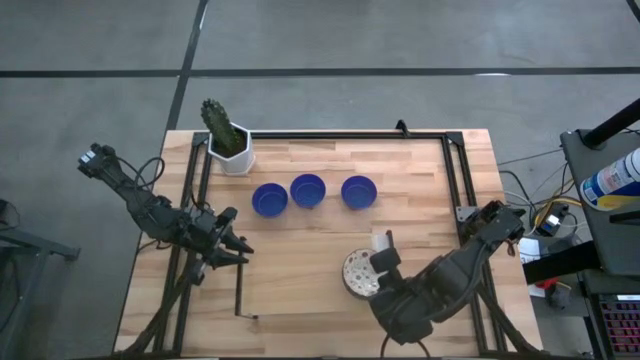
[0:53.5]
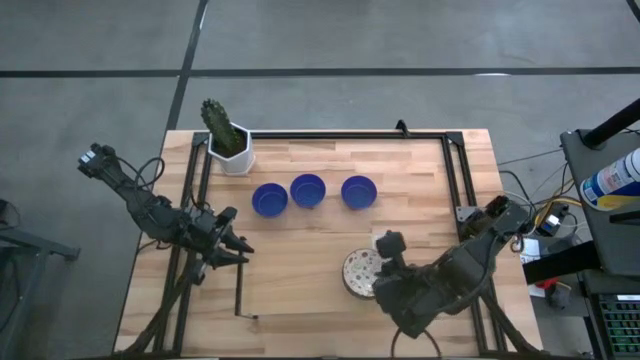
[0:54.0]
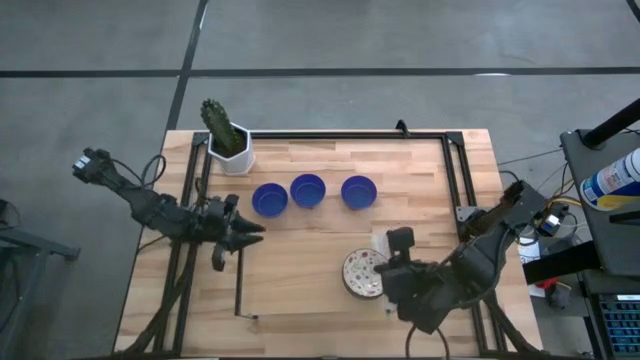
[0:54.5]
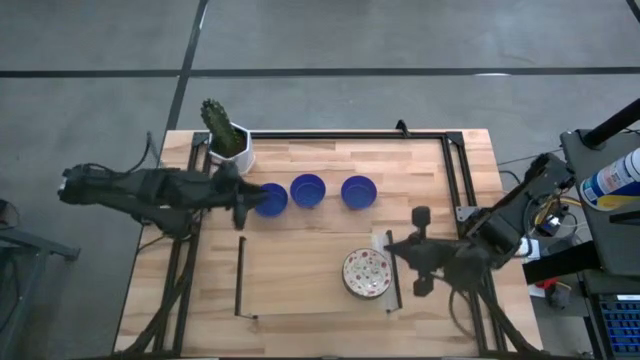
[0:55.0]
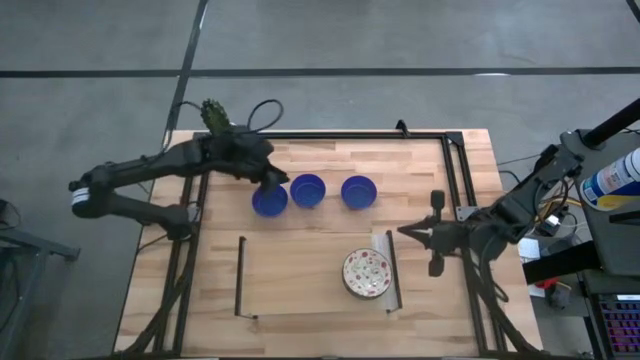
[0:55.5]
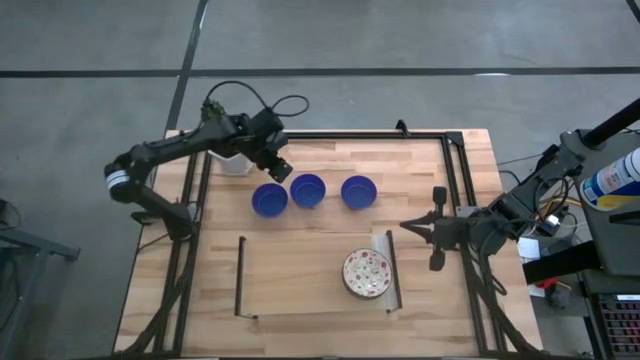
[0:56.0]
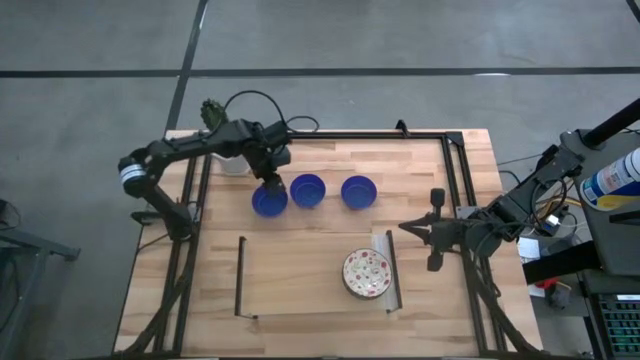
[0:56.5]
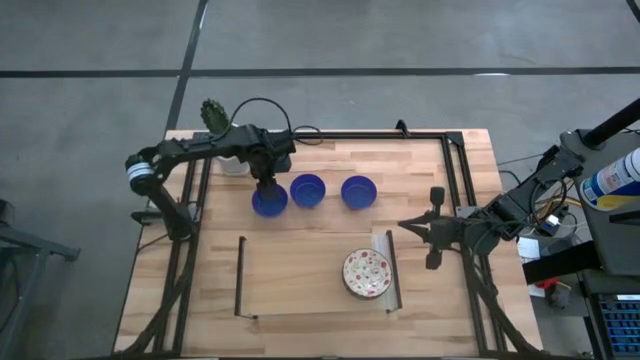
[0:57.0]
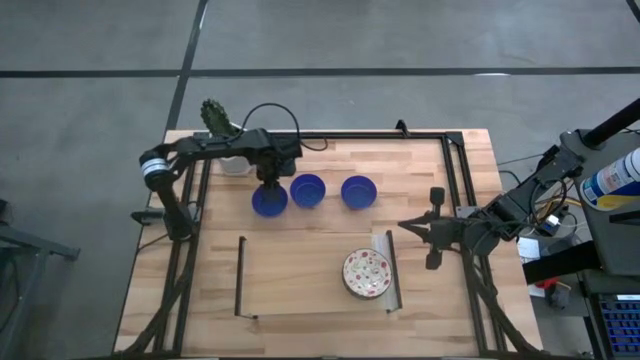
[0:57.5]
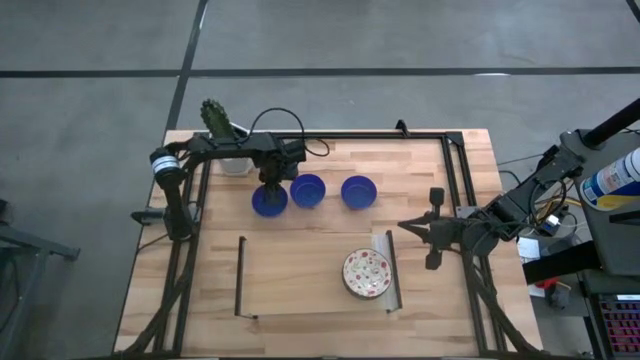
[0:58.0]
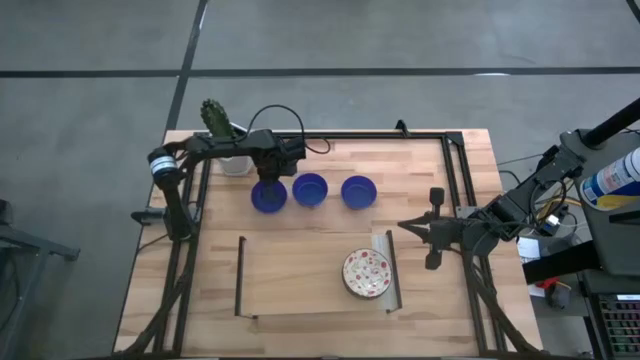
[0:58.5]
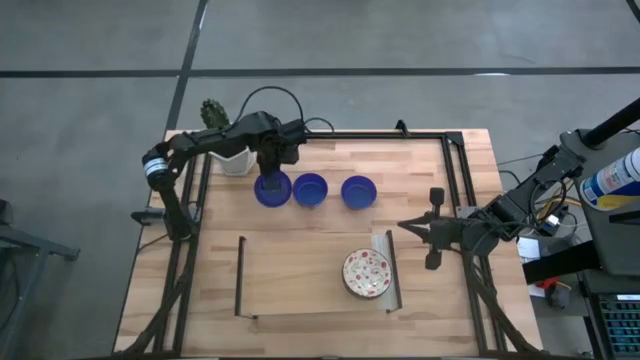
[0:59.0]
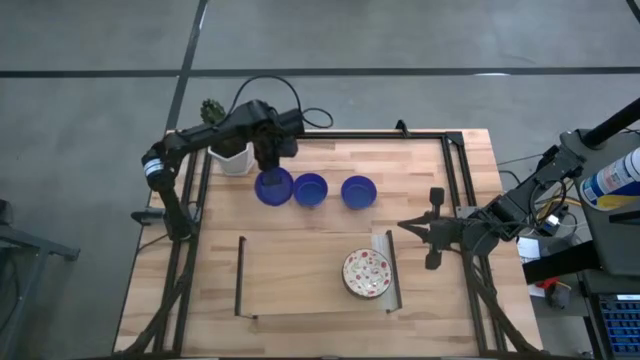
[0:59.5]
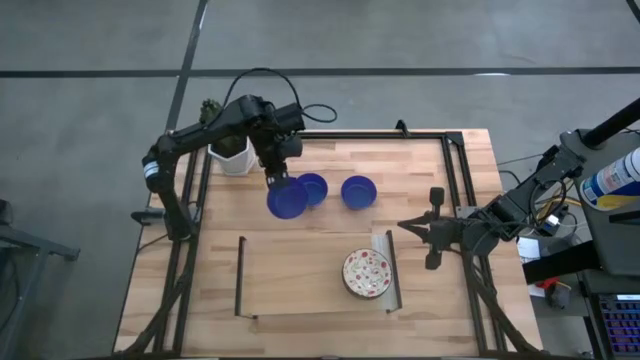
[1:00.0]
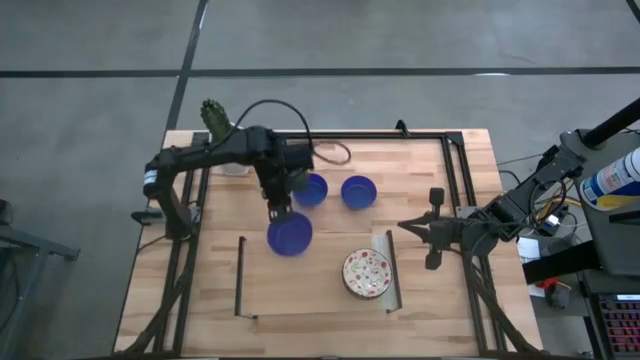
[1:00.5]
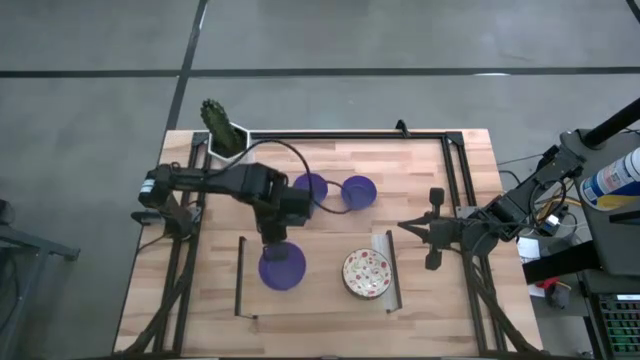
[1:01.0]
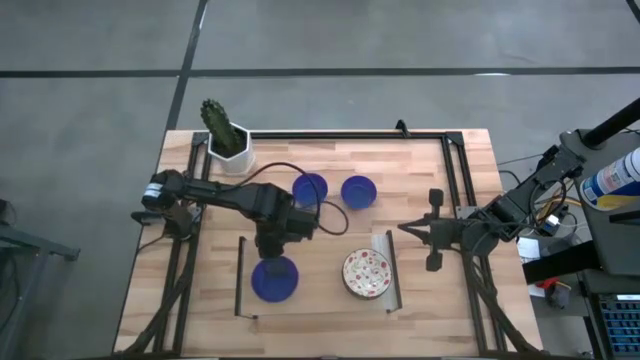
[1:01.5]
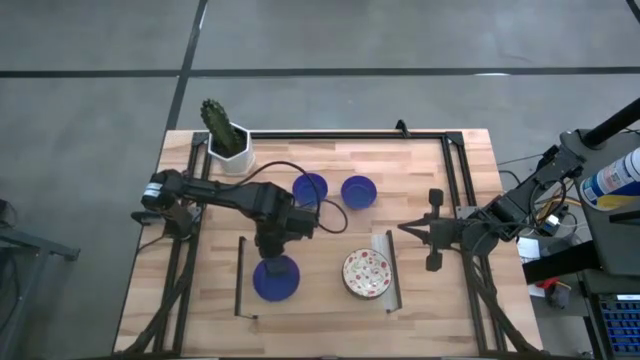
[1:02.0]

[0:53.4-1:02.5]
Task: Pick & Place Mini bowls
Put the left blue bowl on the shelf

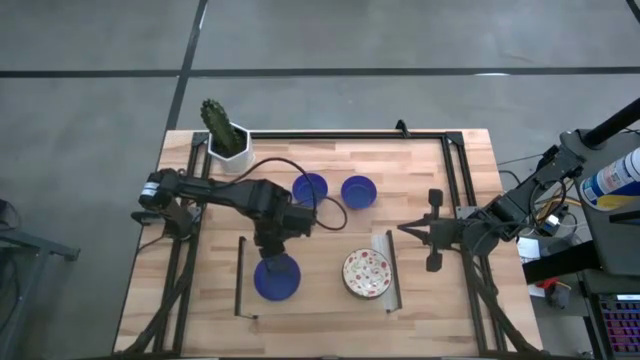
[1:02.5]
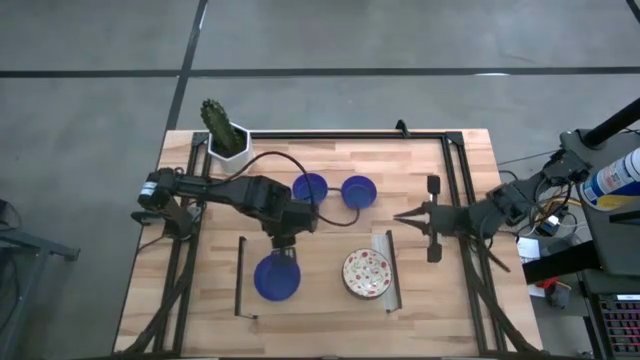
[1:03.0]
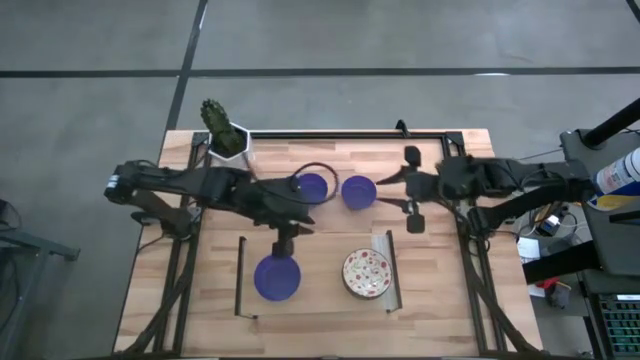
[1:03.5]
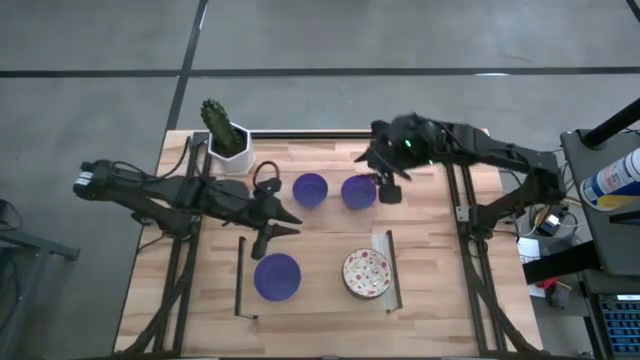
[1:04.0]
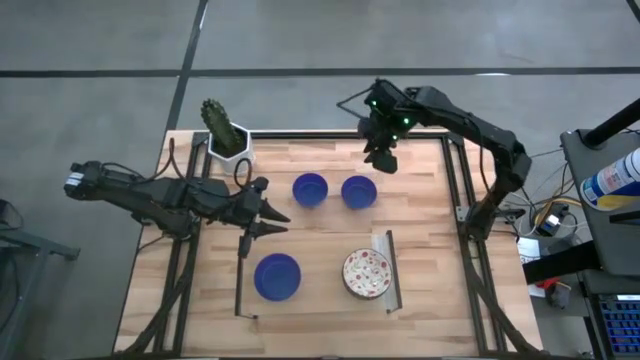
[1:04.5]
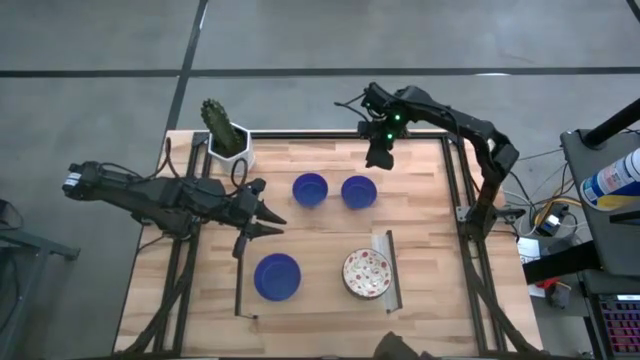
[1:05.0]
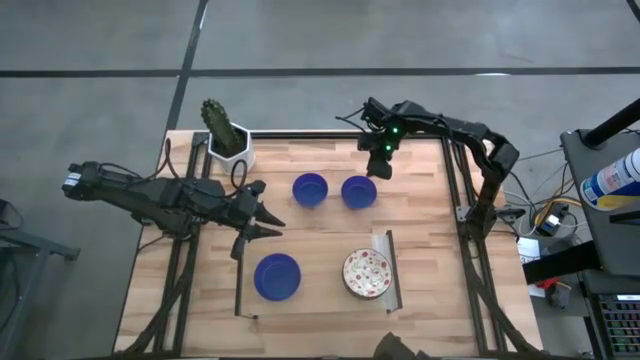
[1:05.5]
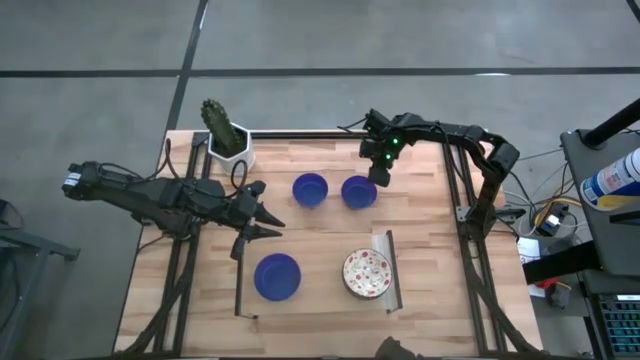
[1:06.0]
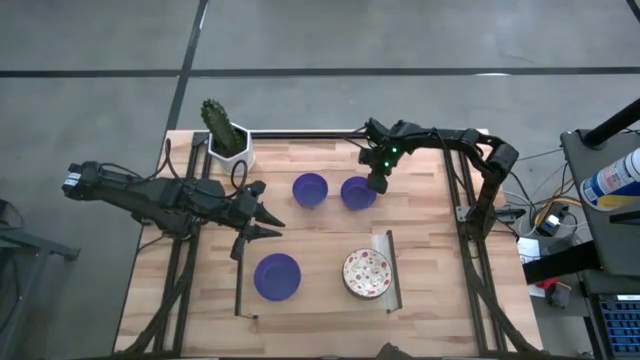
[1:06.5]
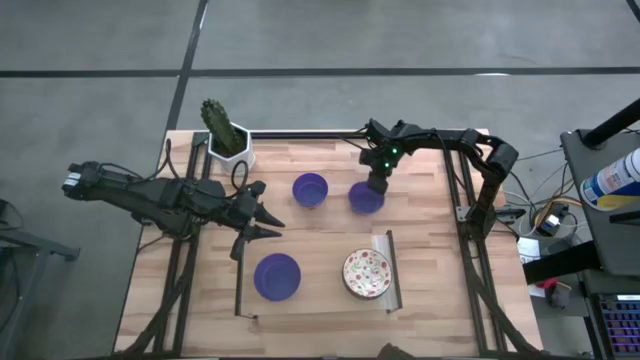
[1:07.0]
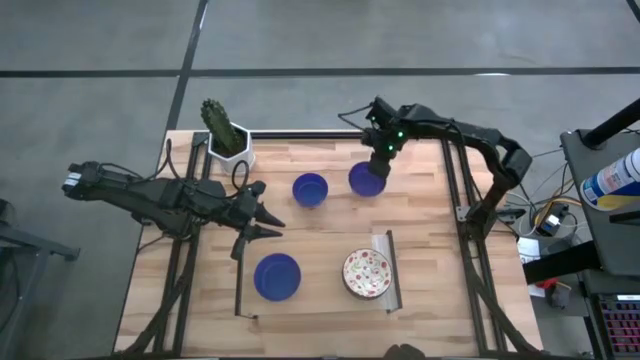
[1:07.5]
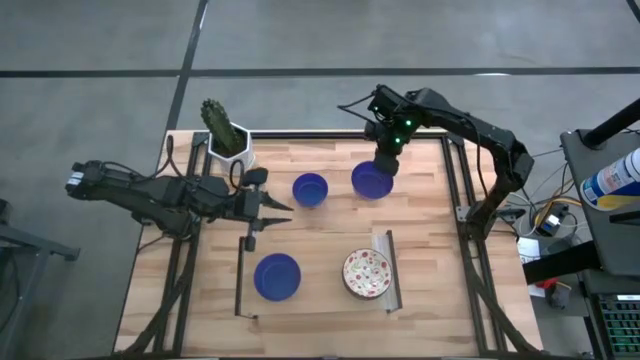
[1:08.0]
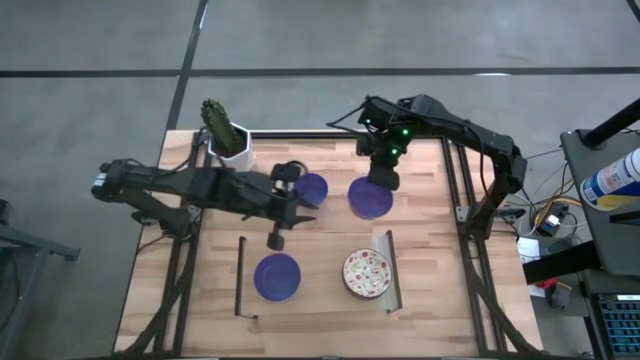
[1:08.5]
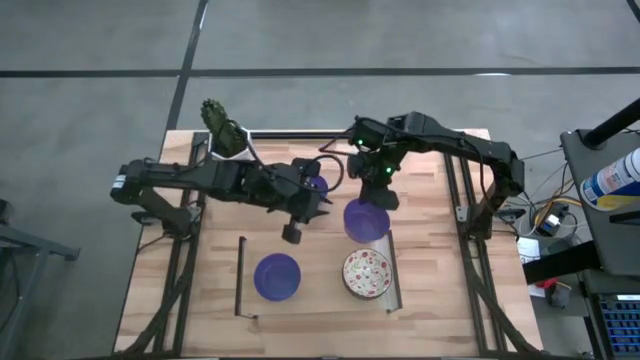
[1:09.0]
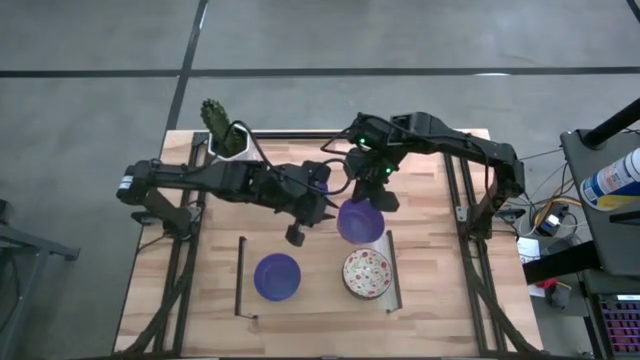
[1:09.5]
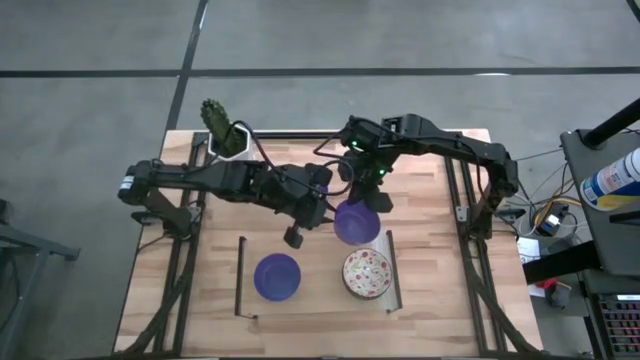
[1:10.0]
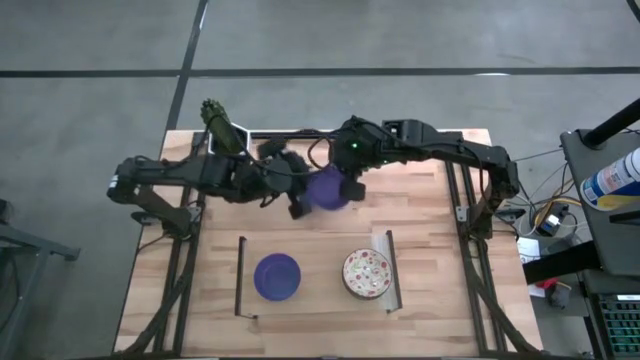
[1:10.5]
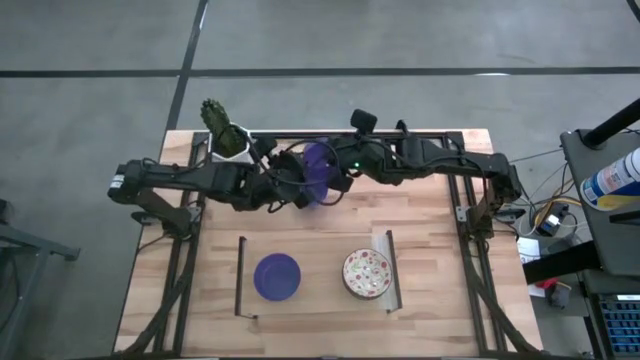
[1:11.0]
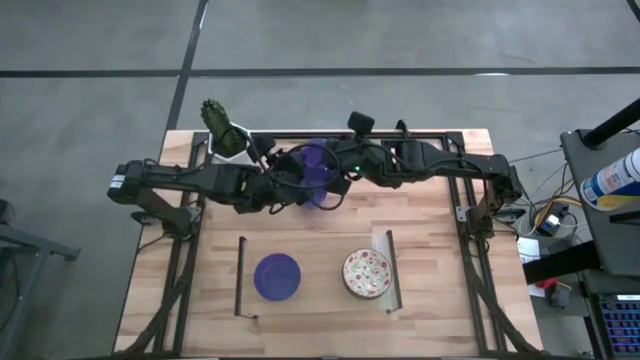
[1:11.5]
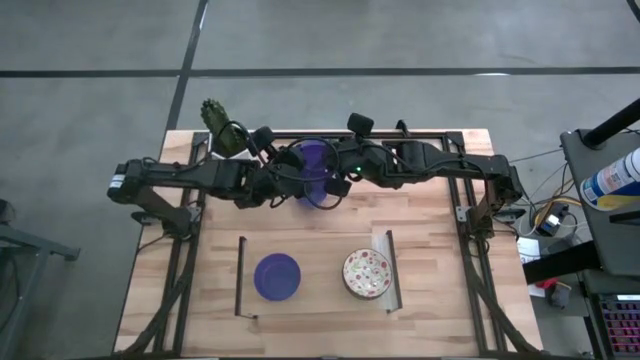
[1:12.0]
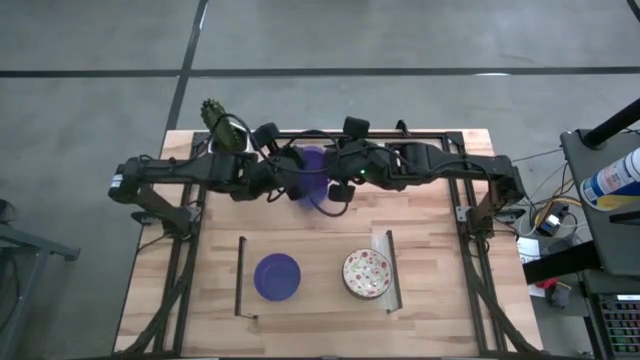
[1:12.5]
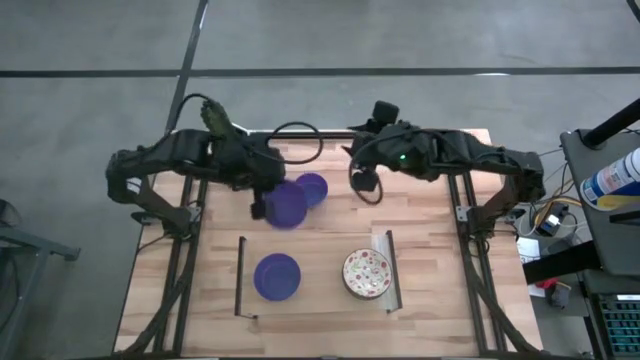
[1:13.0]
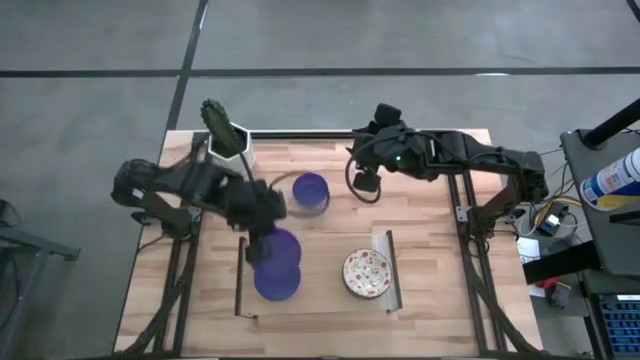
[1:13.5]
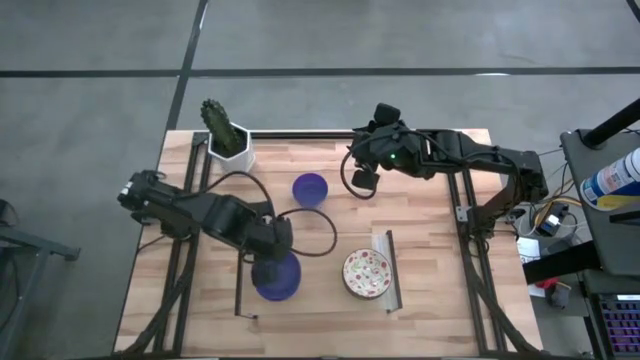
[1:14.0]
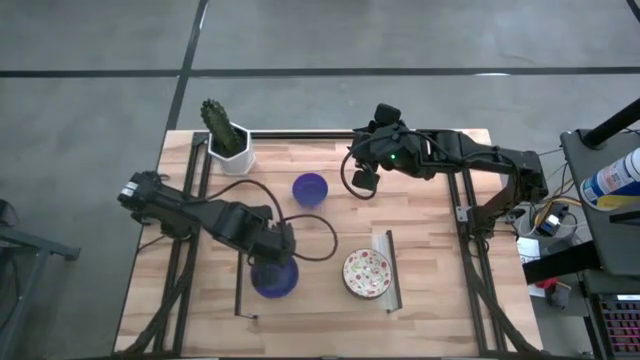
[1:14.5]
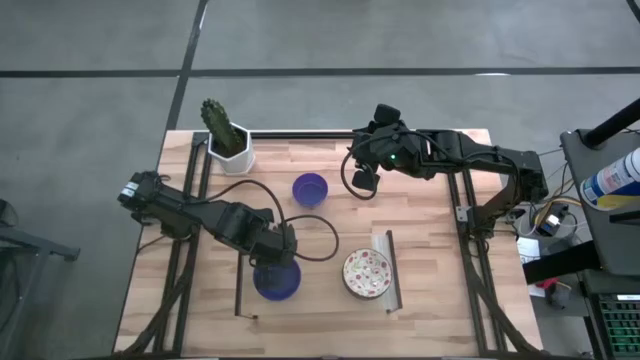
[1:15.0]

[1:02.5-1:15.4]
Stack the right blue bowl on the blue bowl on the shelf
